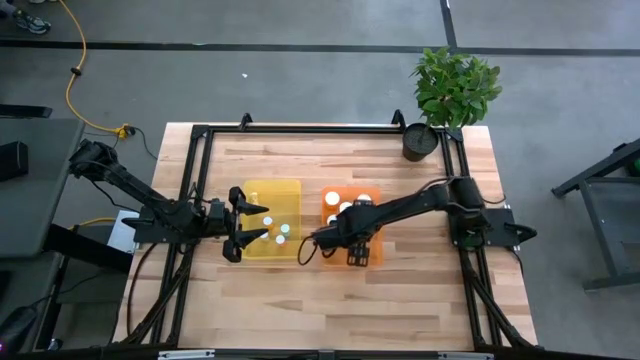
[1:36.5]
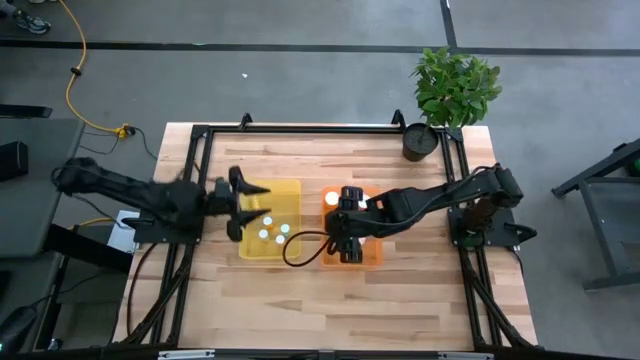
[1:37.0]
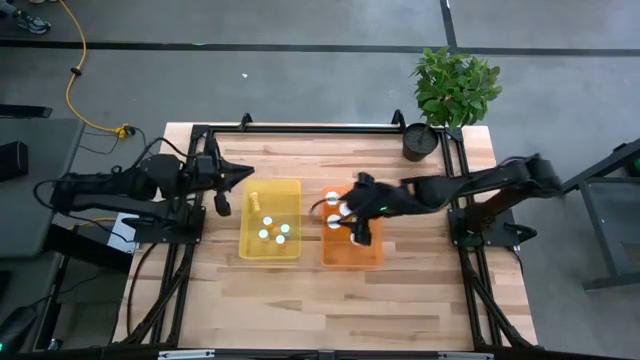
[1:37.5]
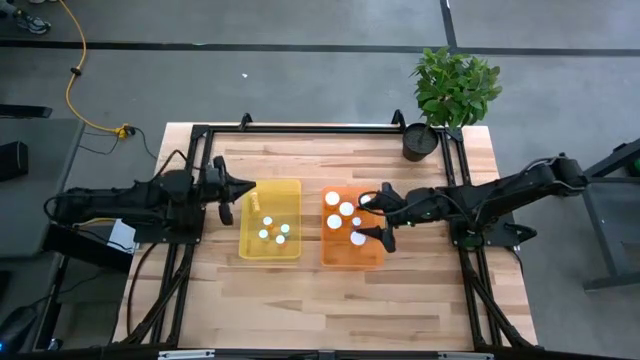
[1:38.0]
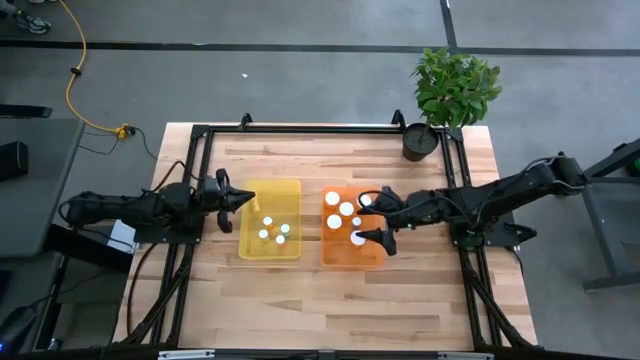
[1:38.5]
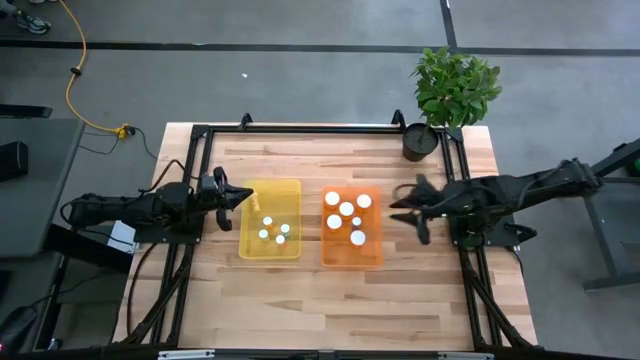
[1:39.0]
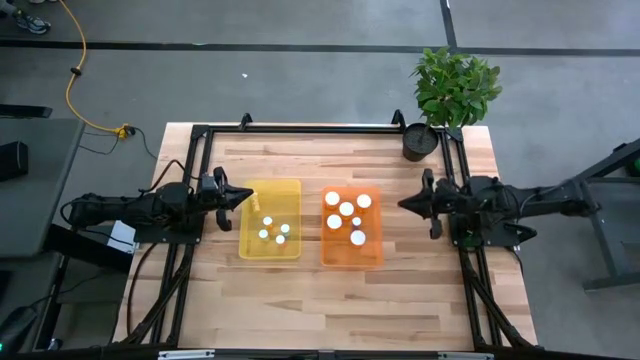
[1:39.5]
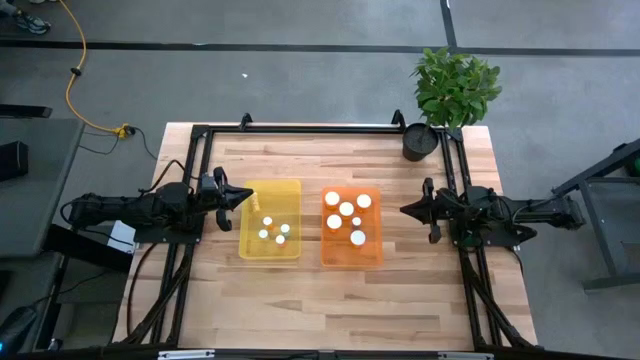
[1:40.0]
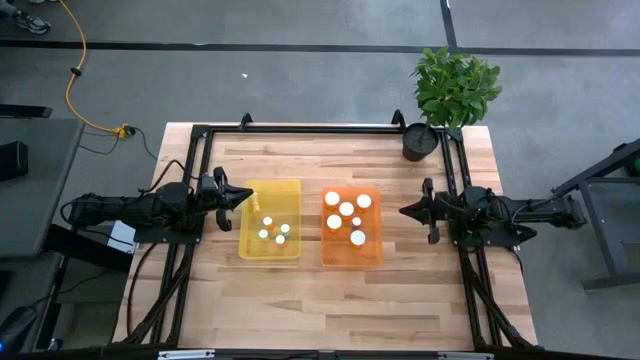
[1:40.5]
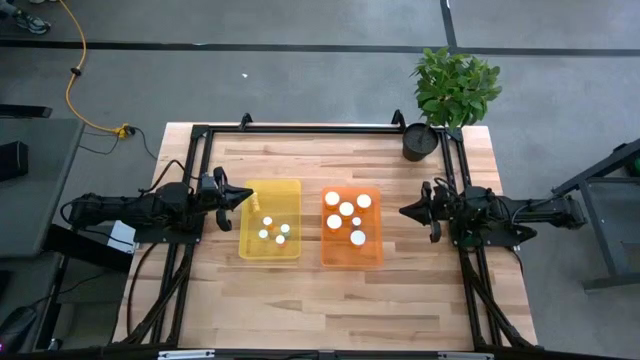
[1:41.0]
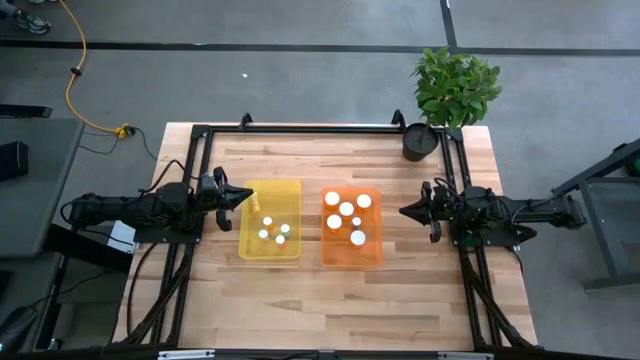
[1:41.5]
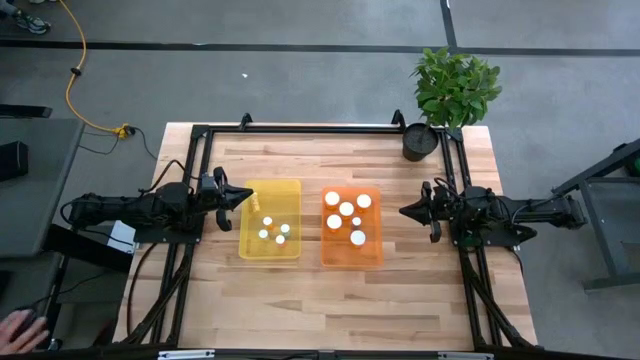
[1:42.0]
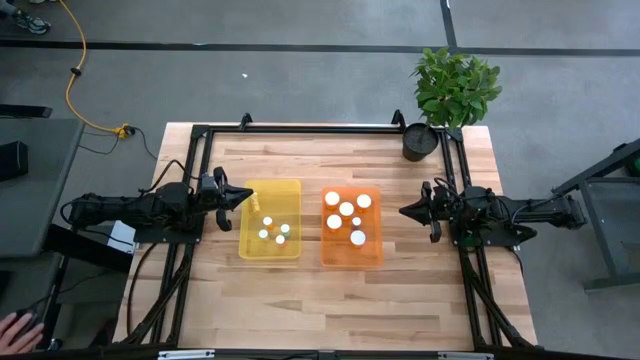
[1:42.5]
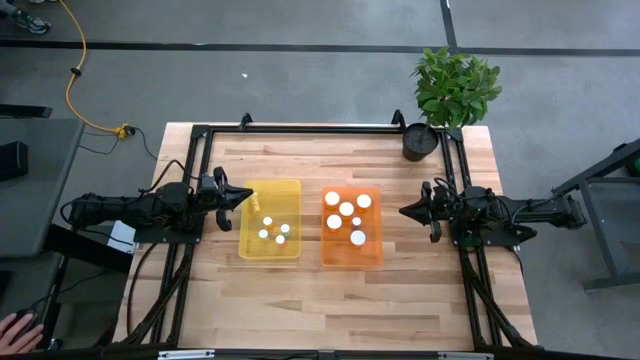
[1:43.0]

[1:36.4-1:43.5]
Task: Pick and place medicine bottles into bin by pill shape (circle, oval)
Return to Home Position

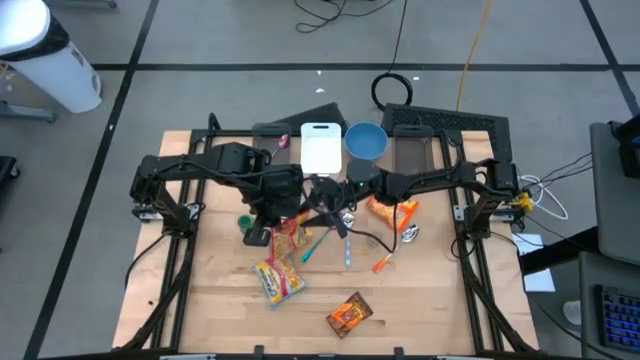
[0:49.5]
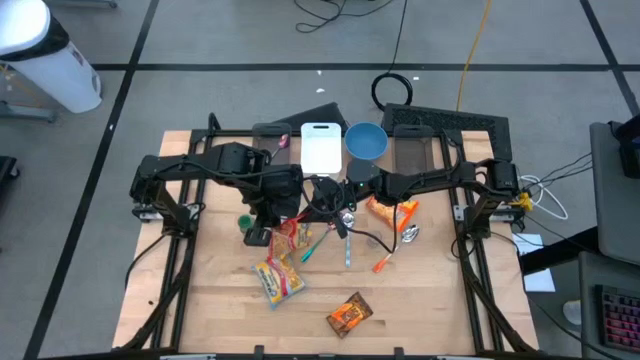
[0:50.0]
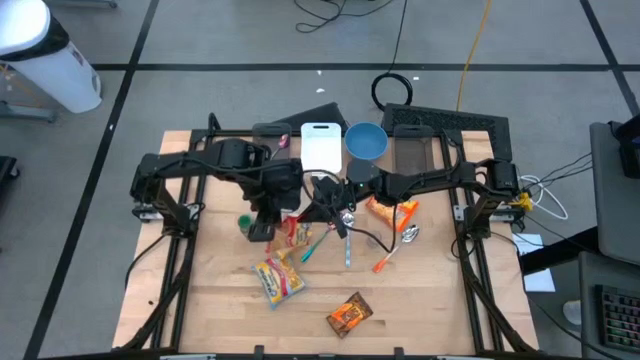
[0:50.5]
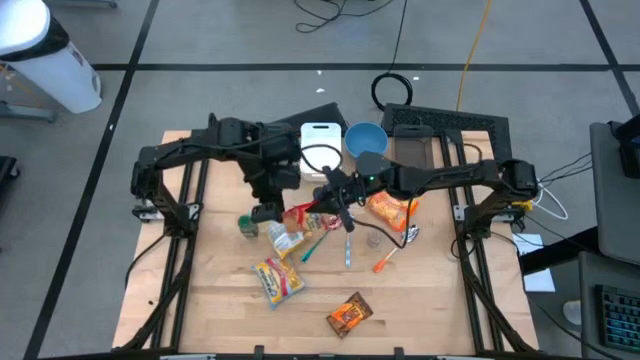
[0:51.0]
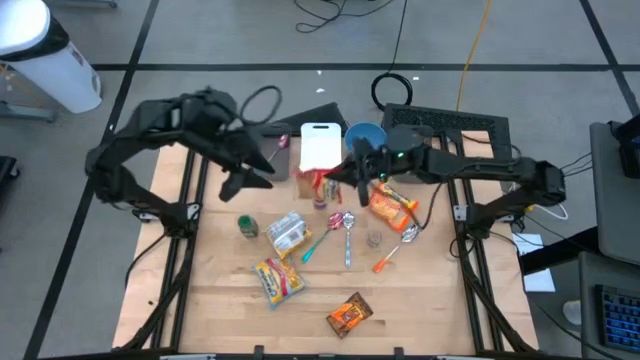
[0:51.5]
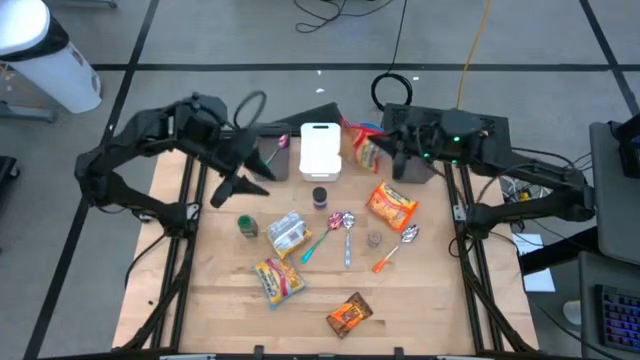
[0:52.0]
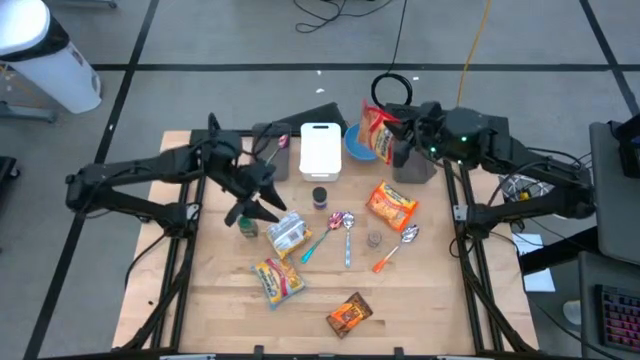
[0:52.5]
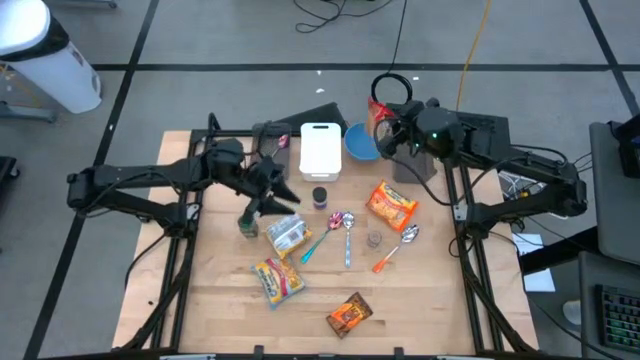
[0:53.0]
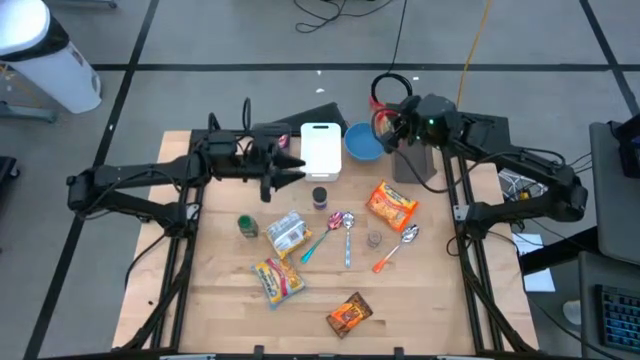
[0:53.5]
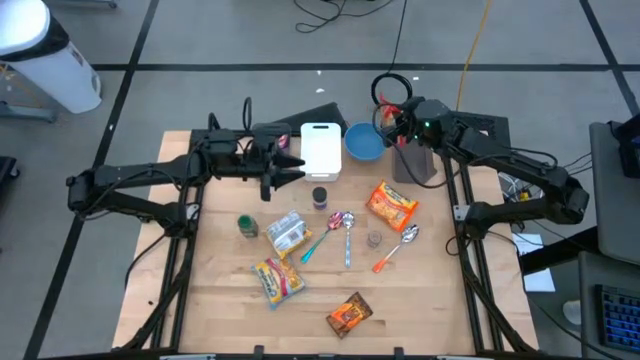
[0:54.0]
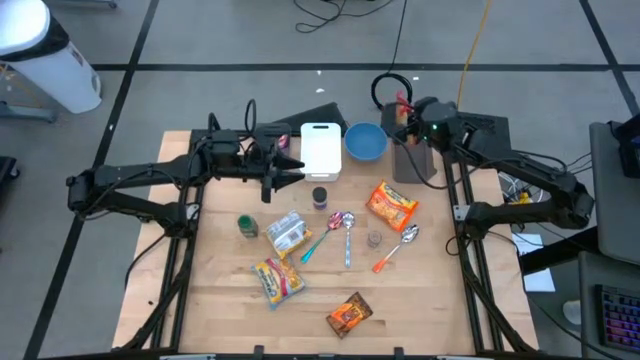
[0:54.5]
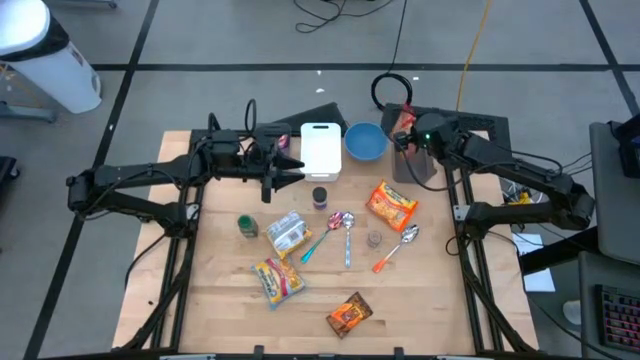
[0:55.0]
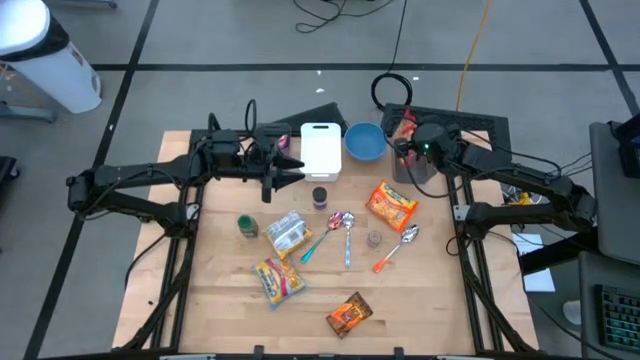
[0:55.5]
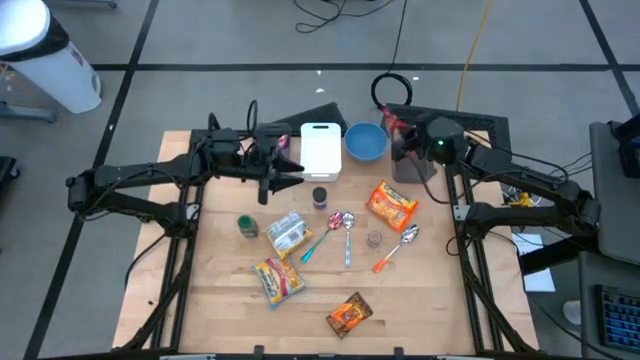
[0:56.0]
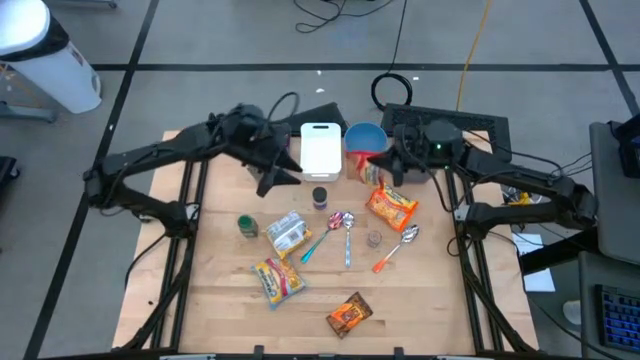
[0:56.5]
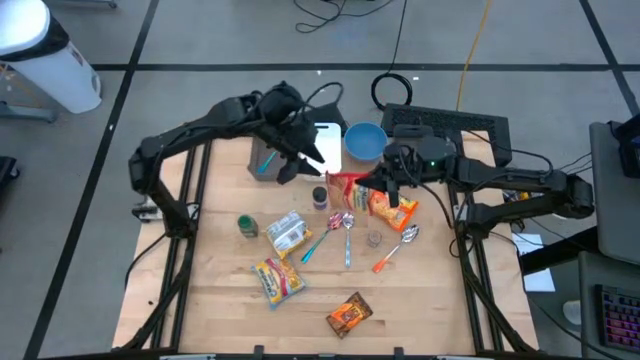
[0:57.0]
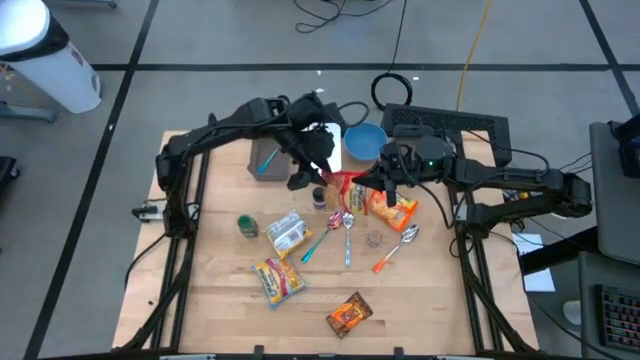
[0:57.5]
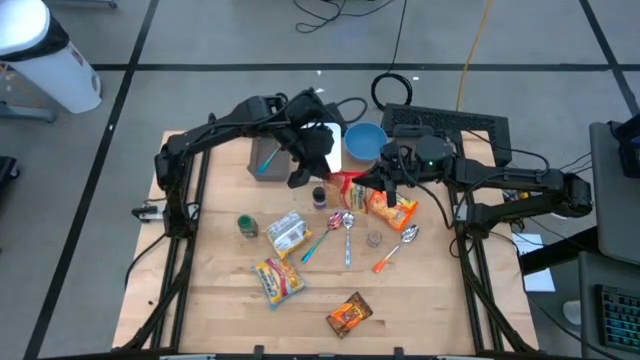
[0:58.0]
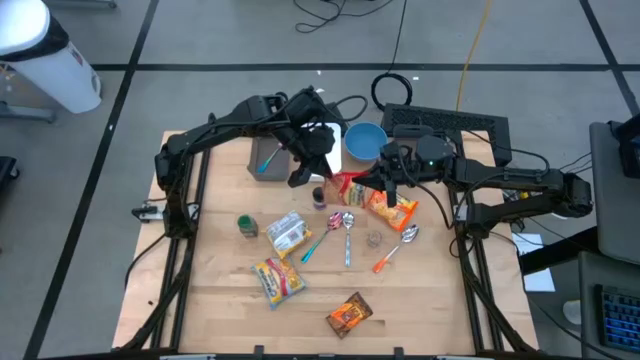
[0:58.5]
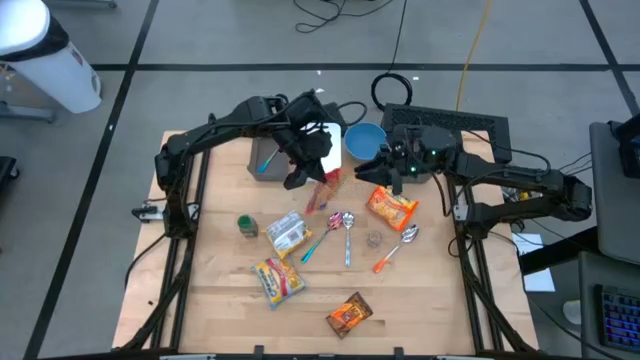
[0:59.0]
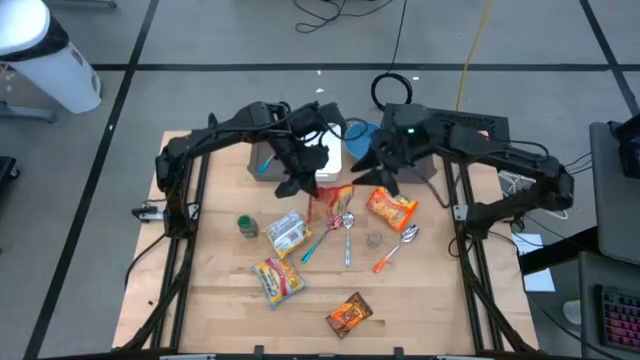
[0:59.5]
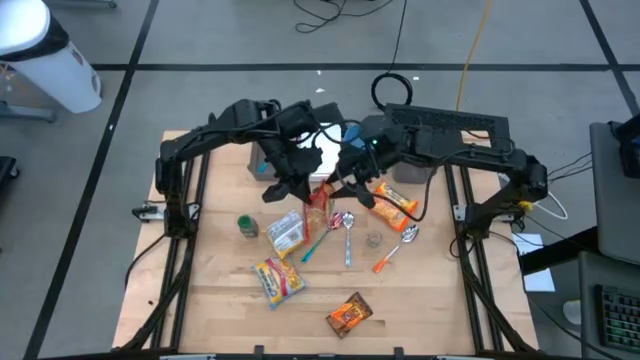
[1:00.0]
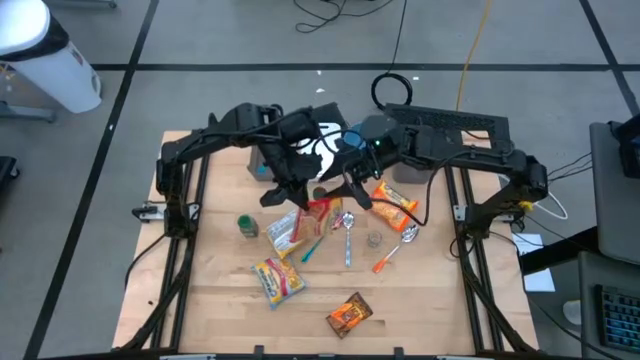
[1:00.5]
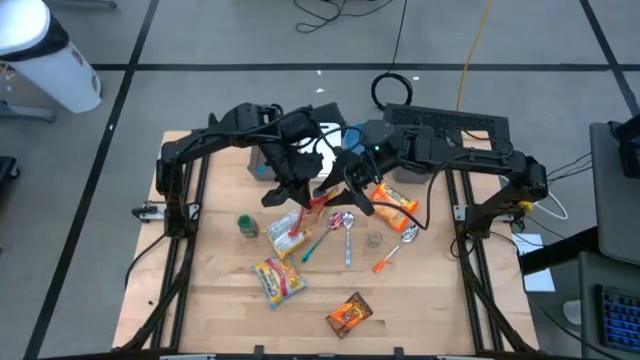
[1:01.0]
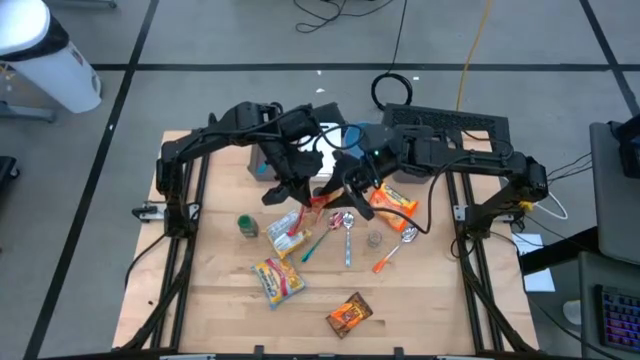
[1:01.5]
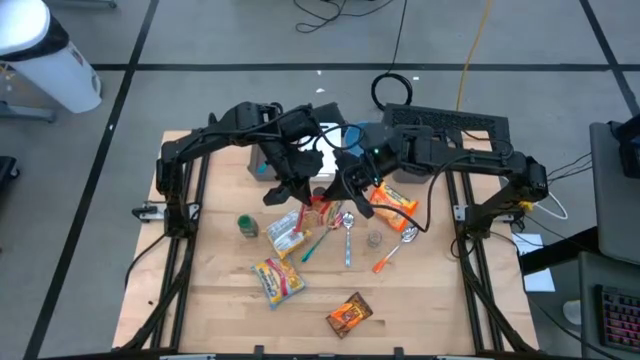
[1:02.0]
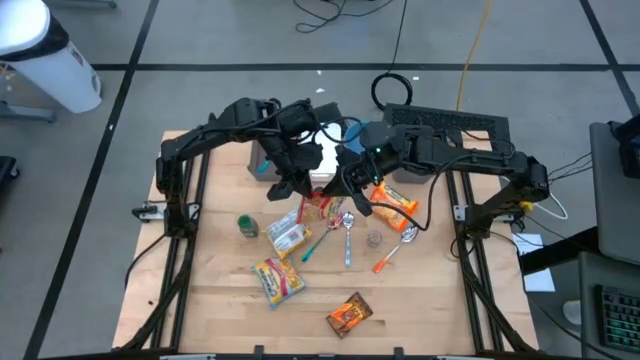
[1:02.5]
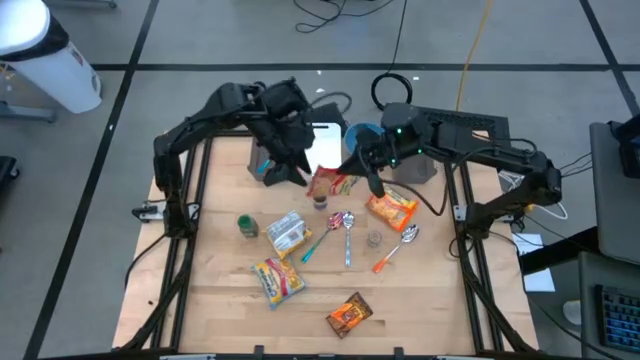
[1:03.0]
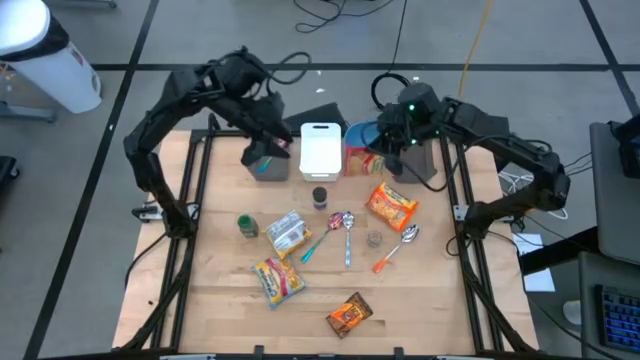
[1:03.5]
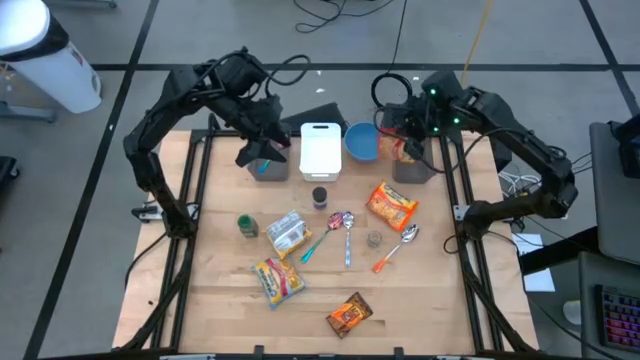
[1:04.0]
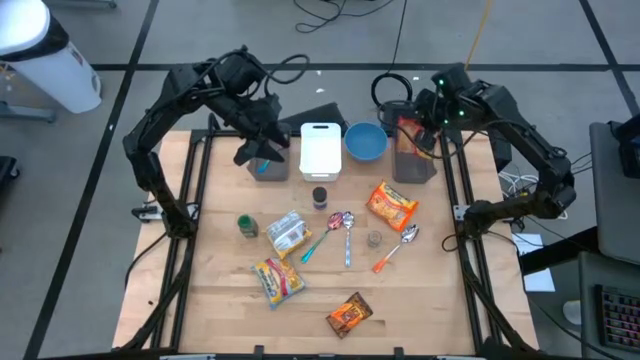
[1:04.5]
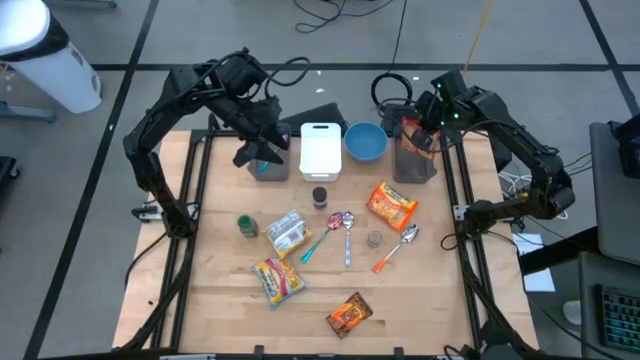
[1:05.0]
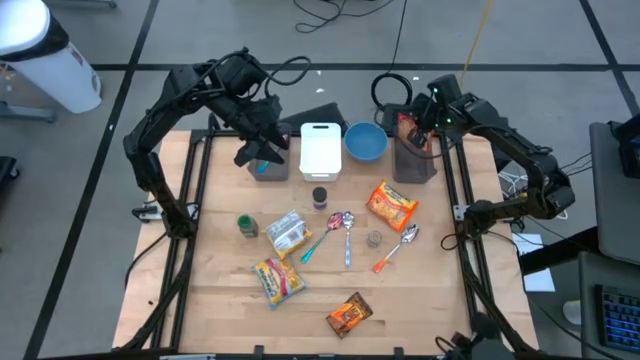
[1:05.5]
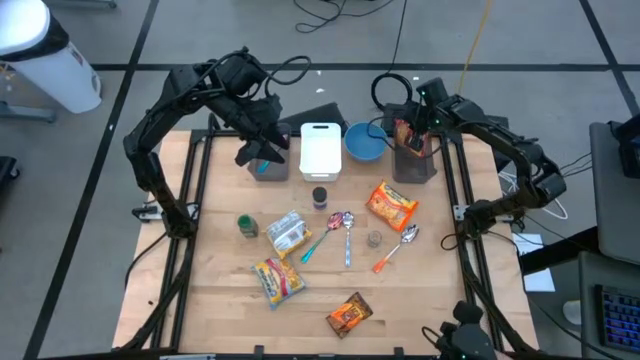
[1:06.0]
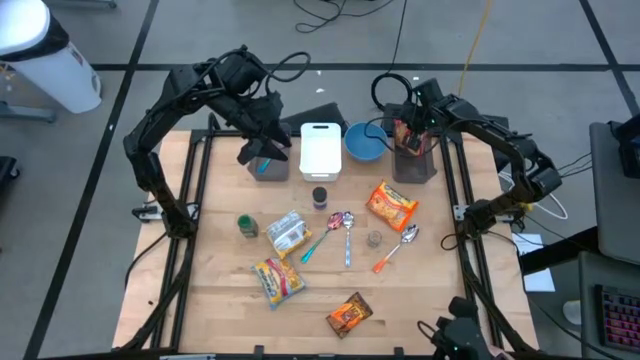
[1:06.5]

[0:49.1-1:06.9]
Task: Pick & Place Food Item
Put the red noodle pack into the right black bin
